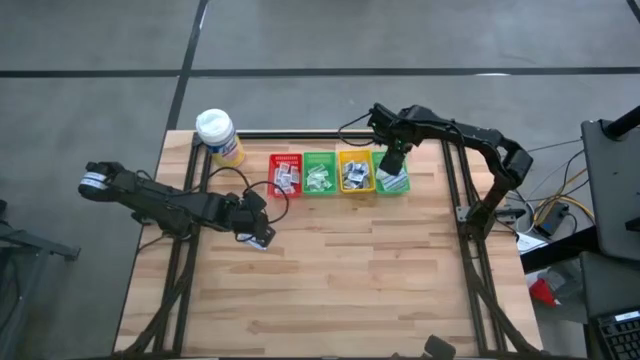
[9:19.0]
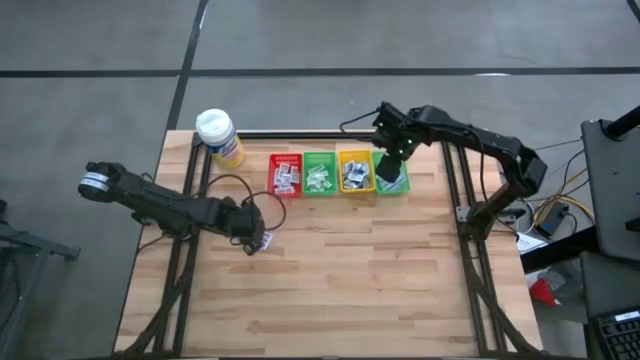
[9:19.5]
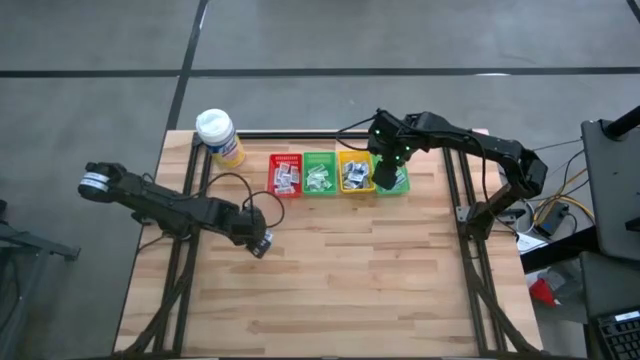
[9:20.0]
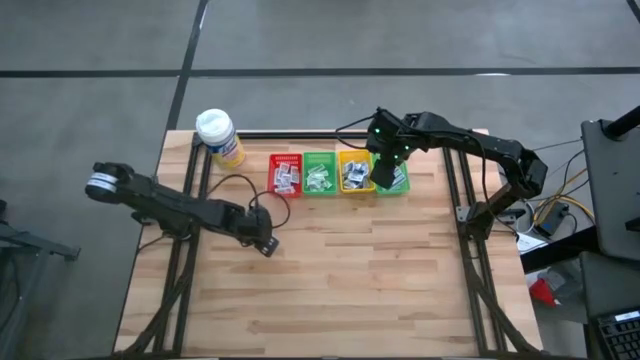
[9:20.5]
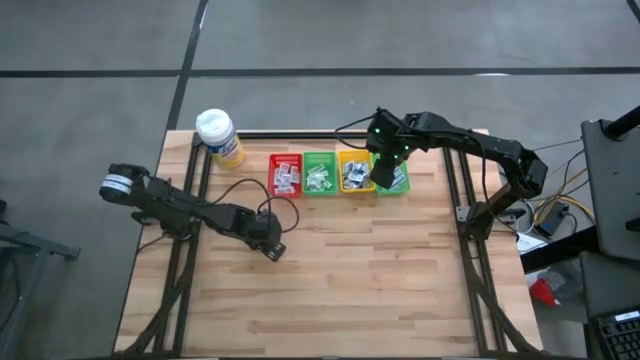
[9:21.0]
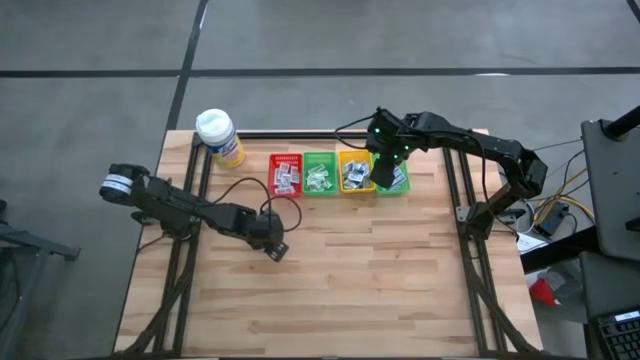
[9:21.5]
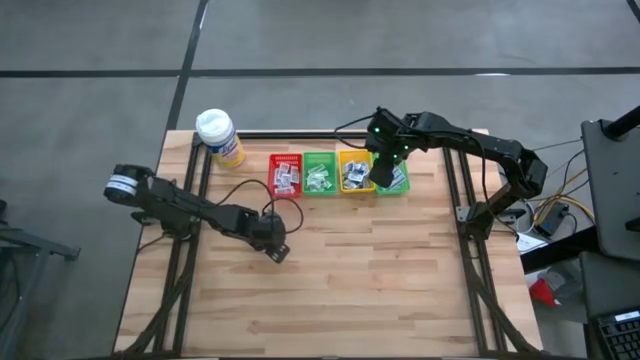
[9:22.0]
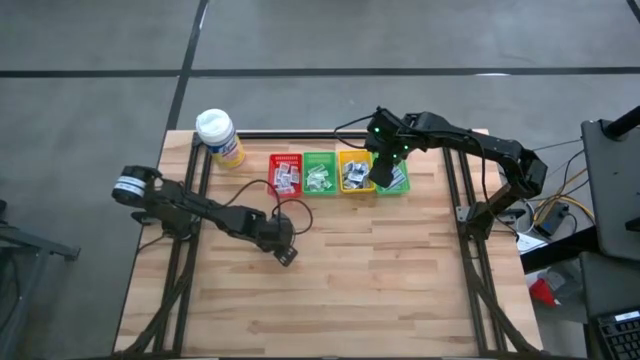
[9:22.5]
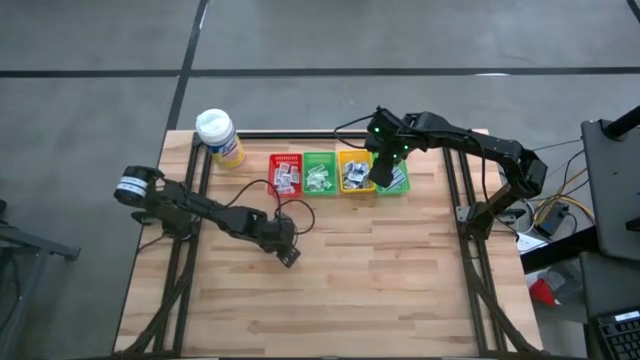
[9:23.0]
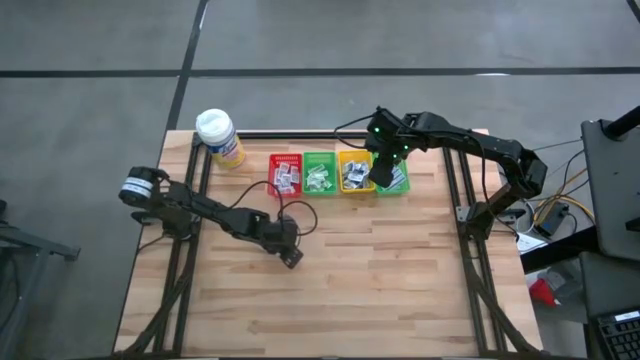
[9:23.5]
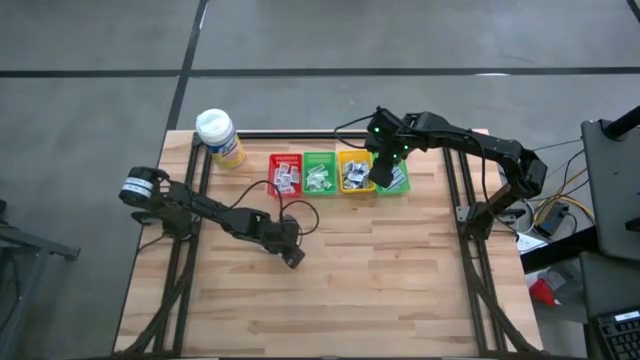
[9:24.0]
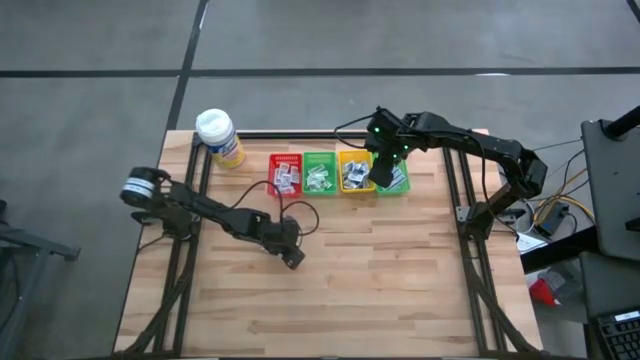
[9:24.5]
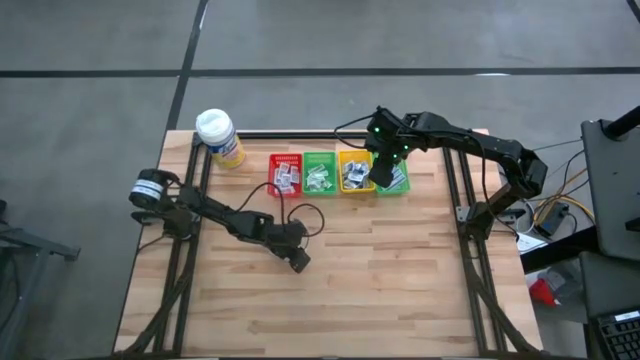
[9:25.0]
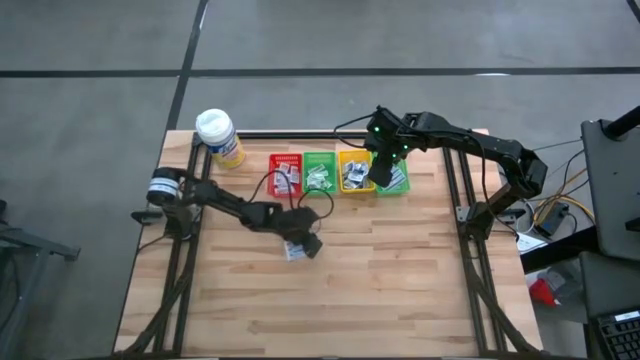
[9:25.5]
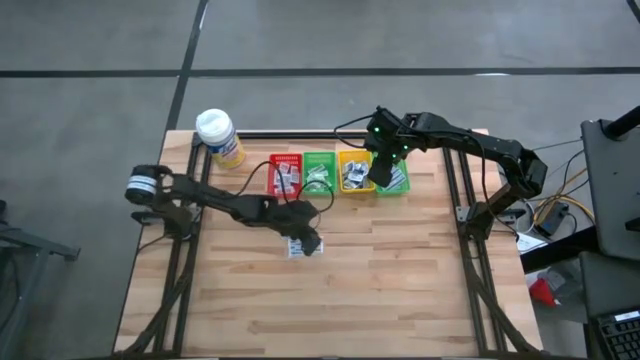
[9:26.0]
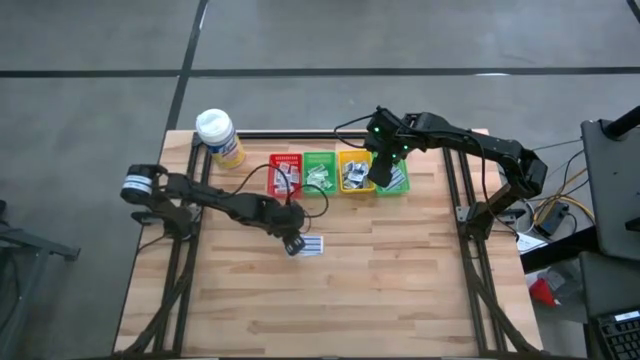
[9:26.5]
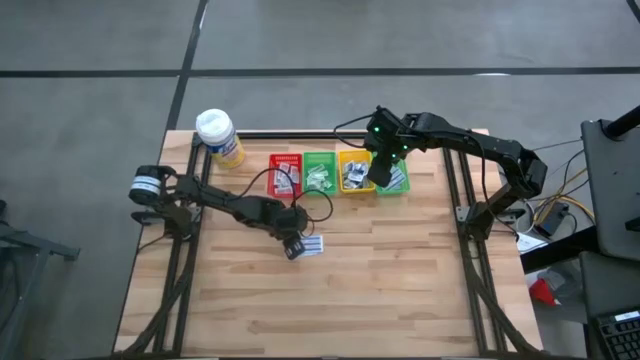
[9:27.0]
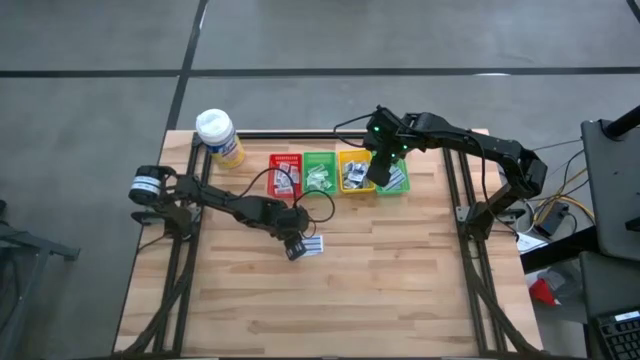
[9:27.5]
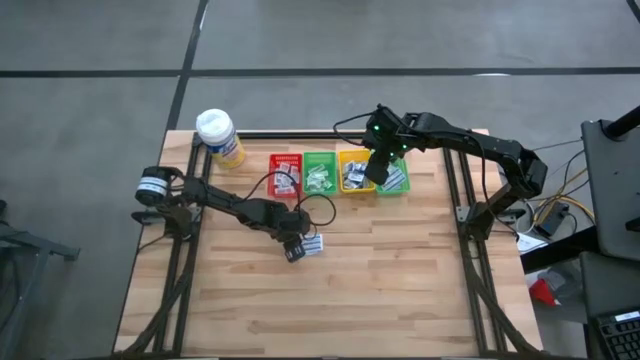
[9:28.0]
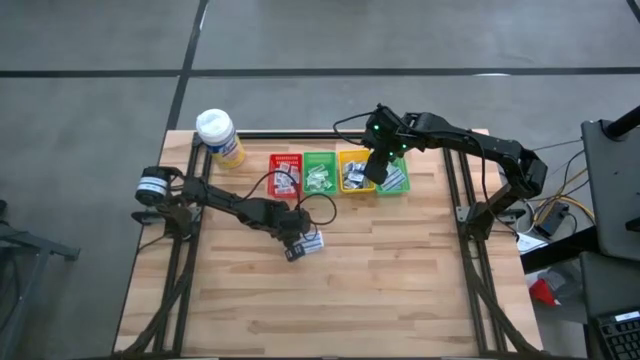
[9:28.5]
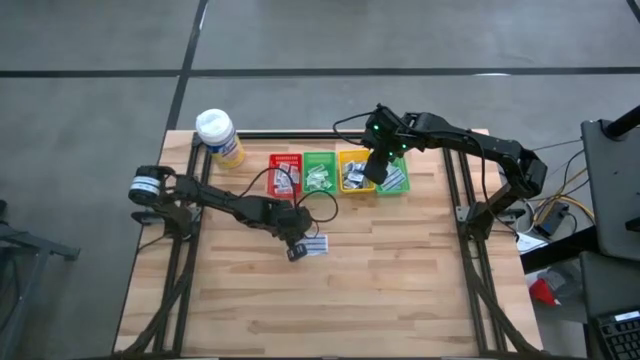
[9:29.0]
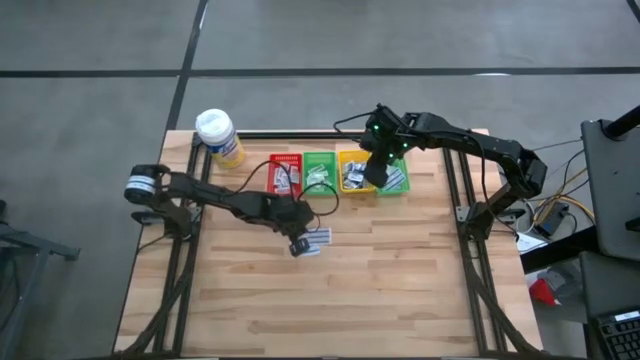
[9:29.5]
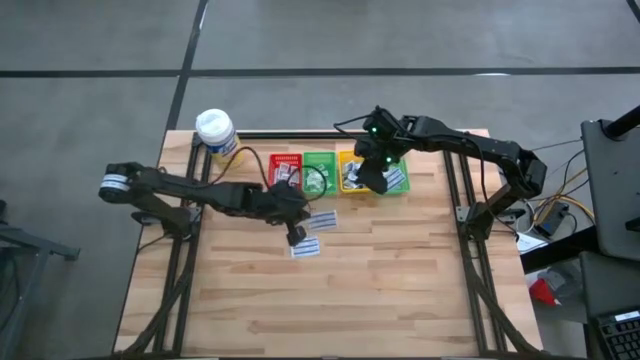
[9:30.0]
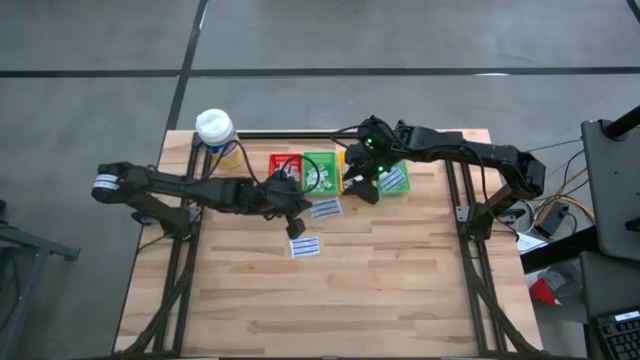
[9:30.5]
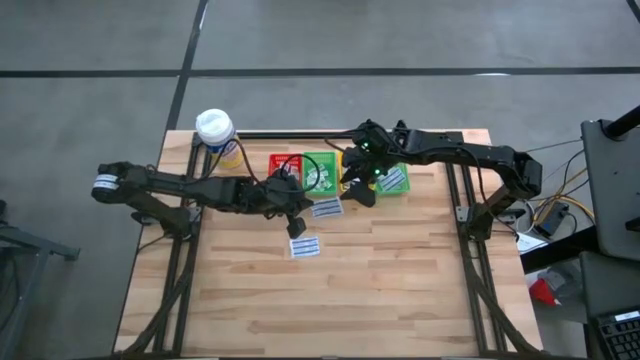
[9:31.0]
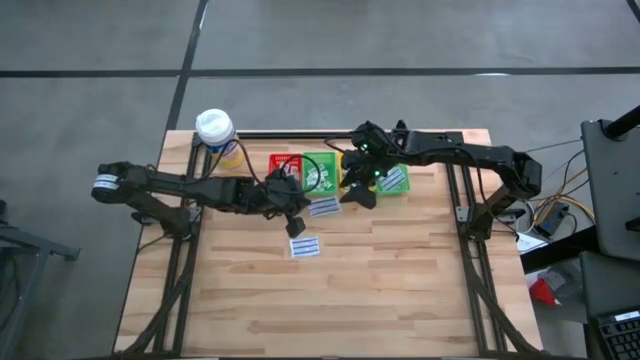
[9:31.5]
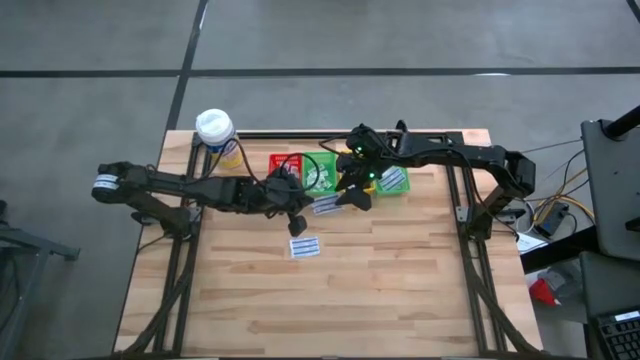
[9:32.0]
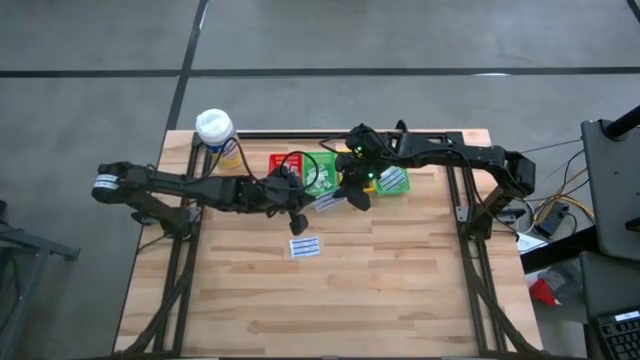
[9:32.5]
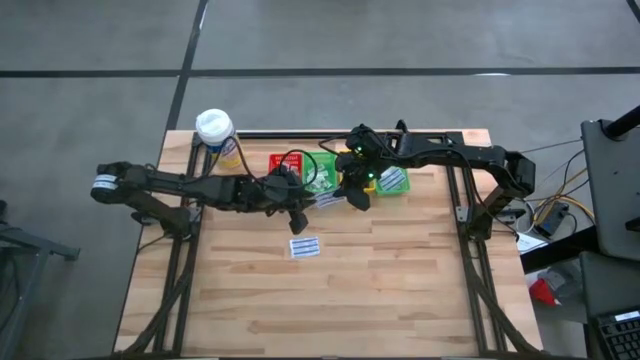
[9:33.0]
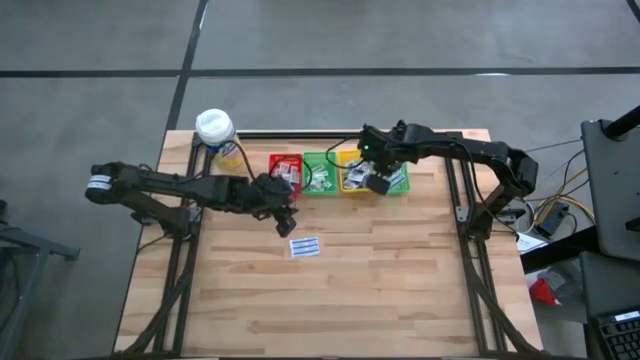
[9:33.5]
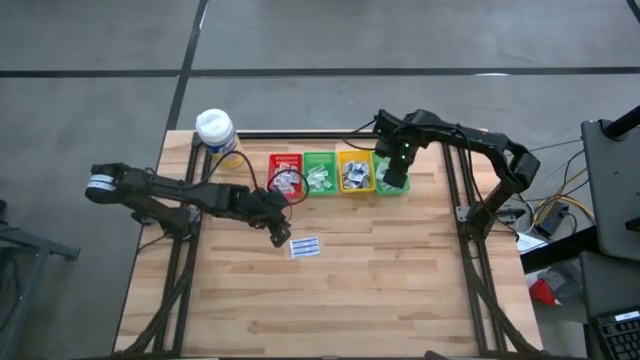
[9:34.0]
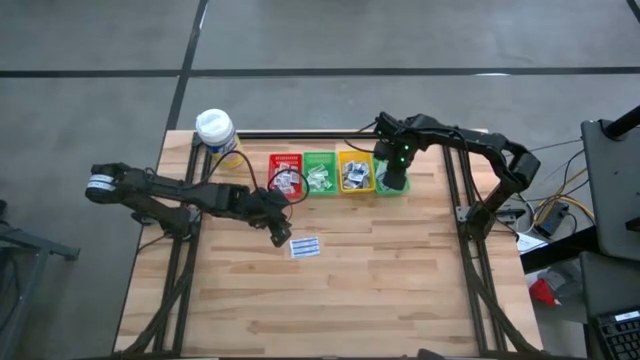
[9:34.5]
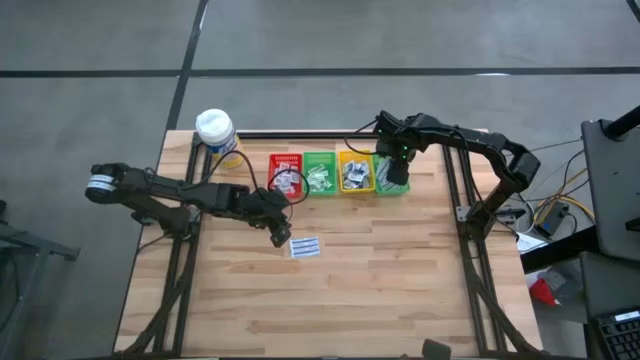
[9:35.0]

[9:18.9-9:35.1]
Task: Pick & Place First Aid Supplies
Put the blue fingertip bandage into the right green bin

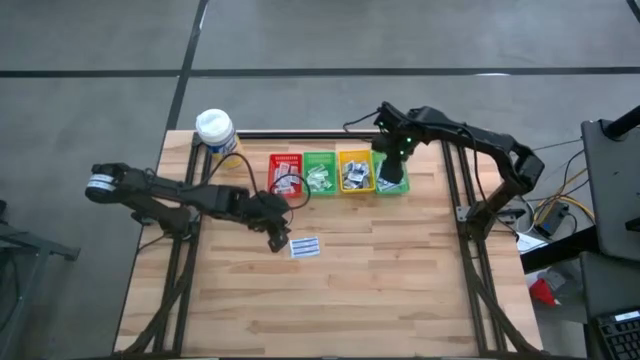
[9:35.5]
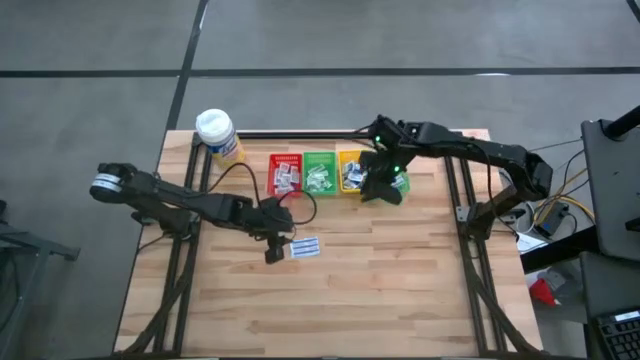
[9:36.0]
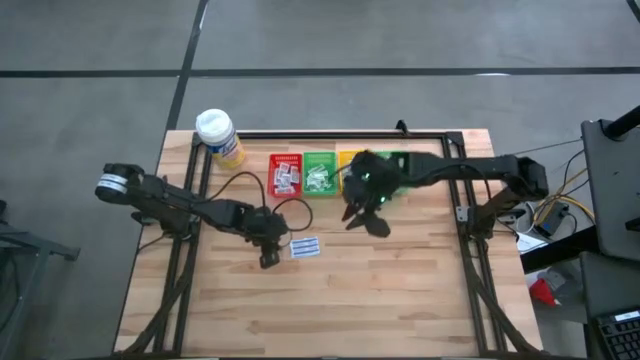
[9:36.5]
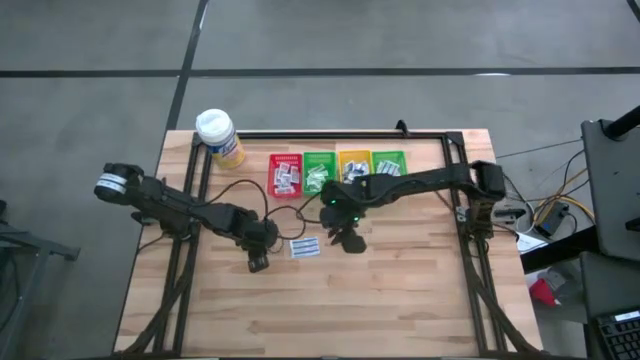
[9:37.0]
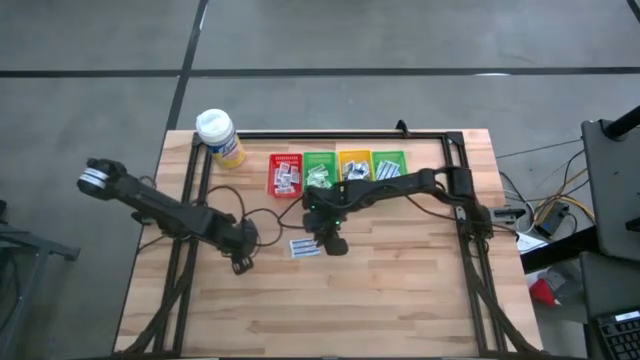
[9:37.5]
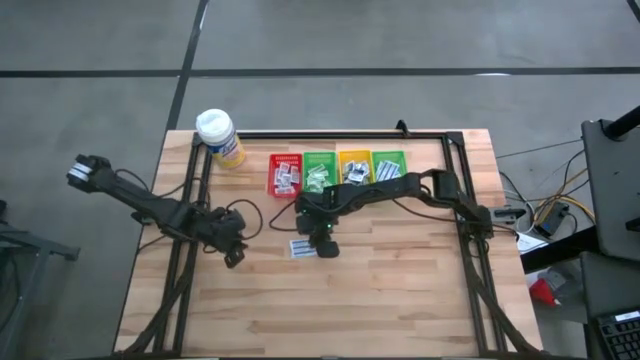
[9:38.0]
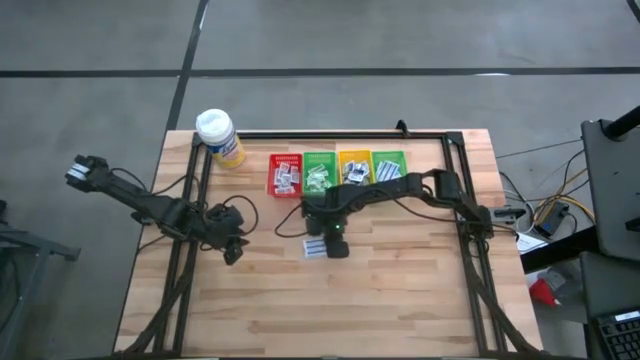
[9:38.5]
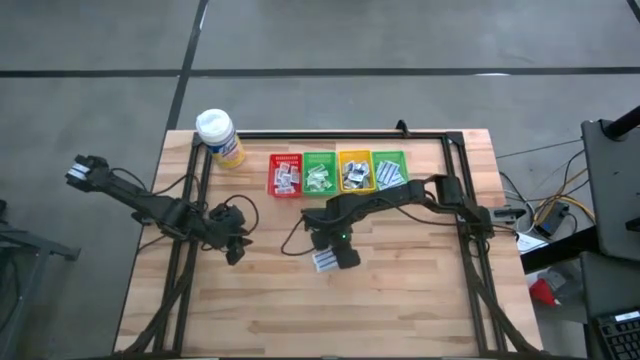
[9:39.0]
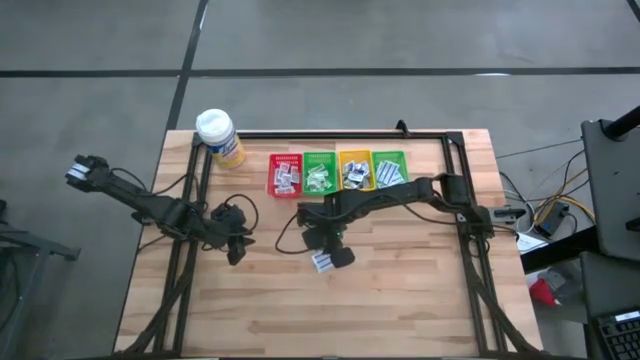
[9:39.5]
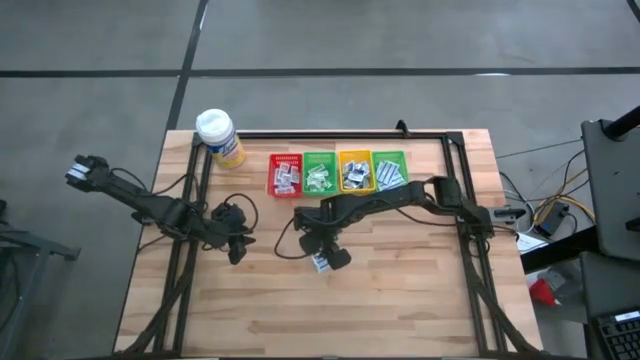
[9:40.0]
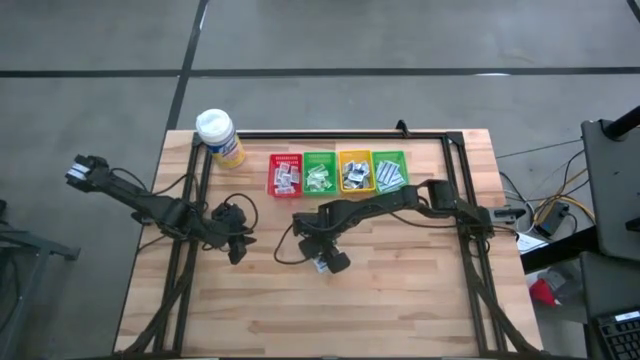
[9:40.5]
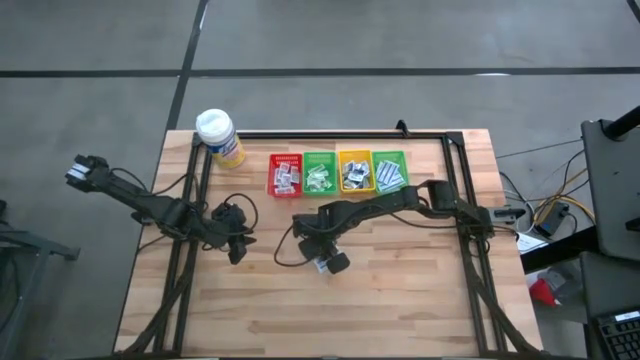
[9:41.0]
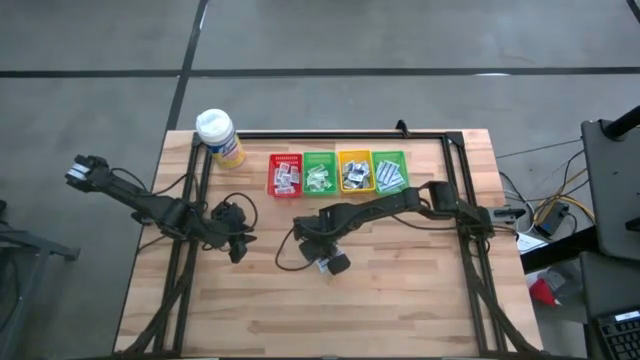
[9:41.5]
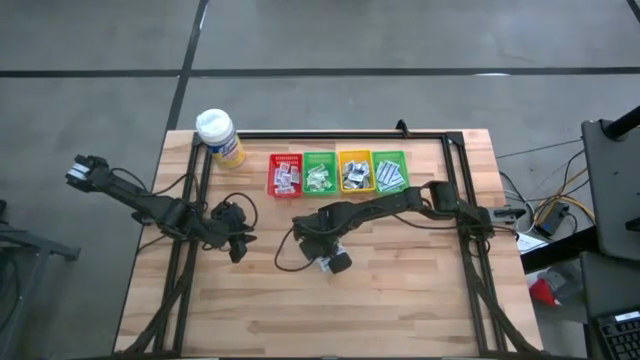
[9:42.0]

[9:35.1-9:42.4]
Put the blue fingertip bandage into the right green bin
